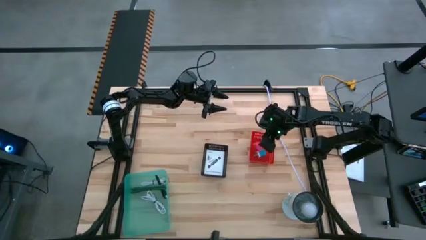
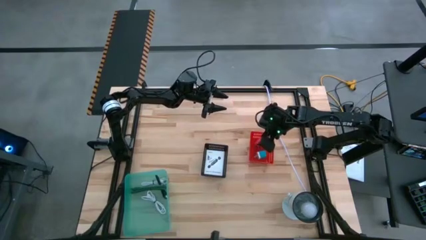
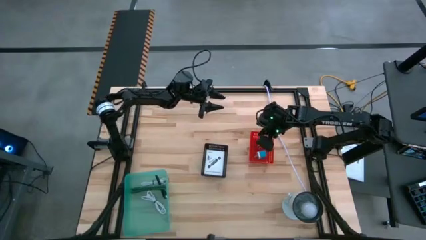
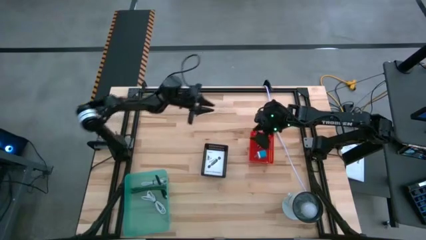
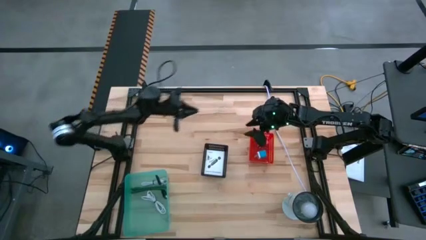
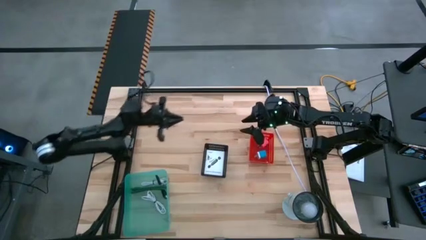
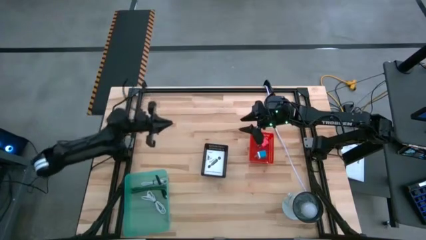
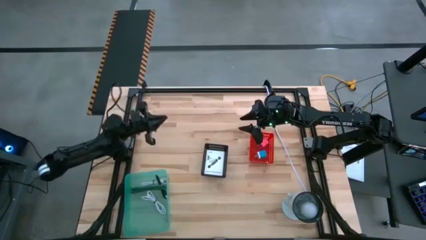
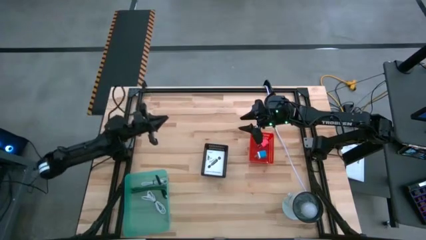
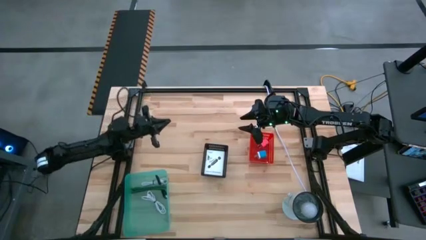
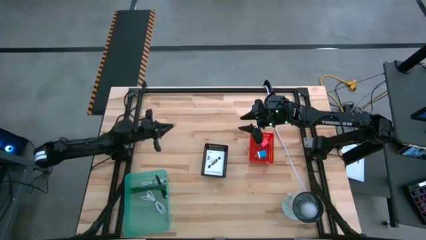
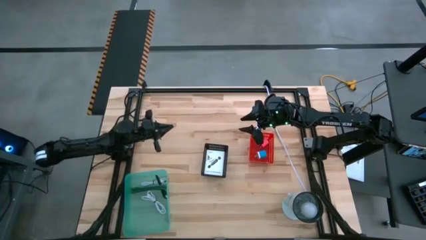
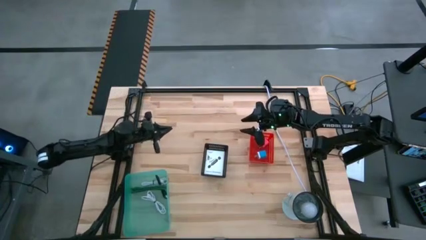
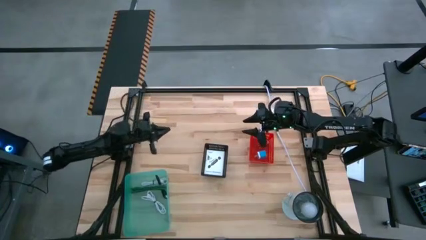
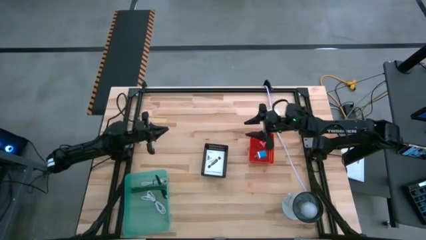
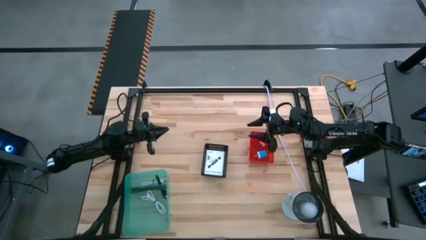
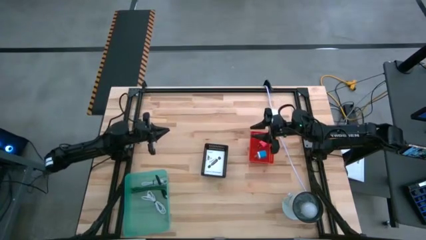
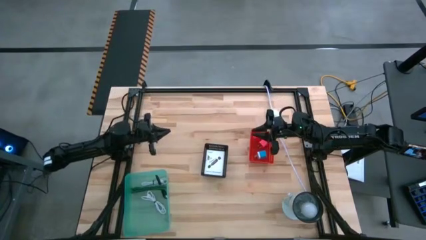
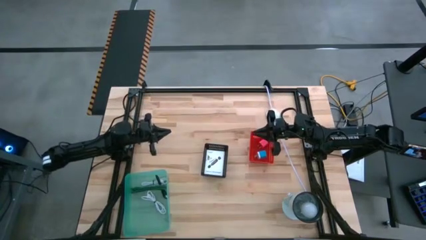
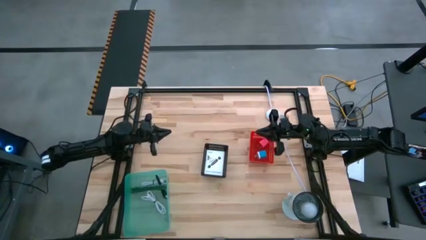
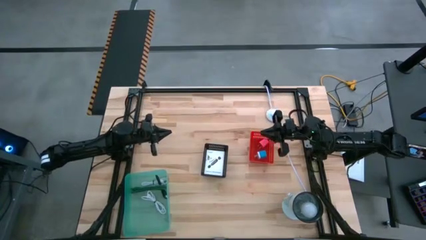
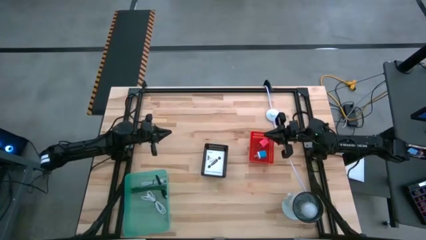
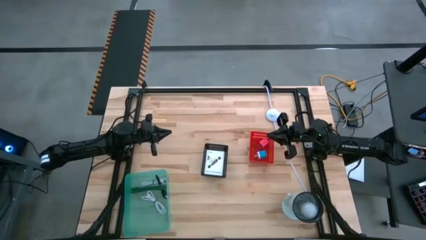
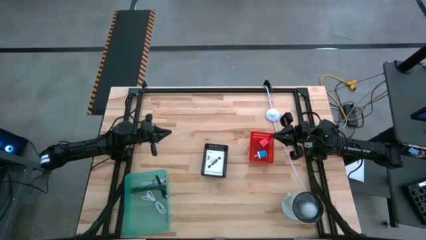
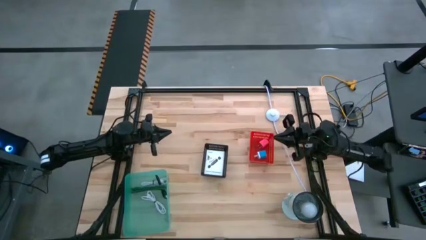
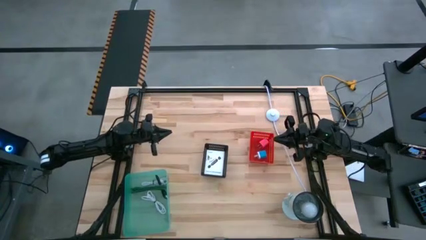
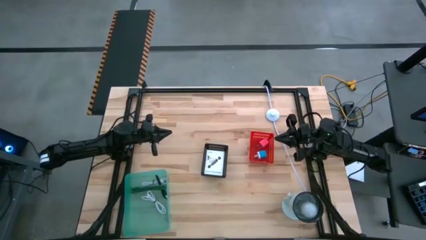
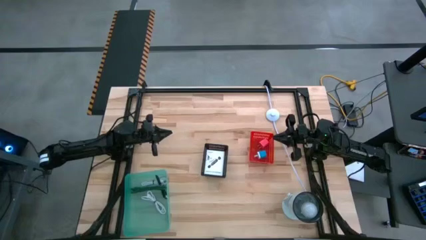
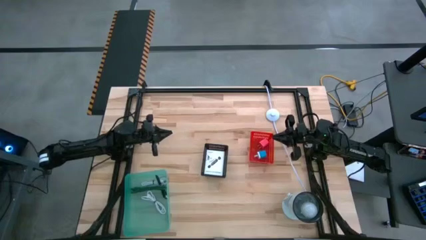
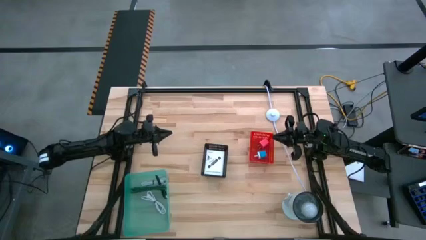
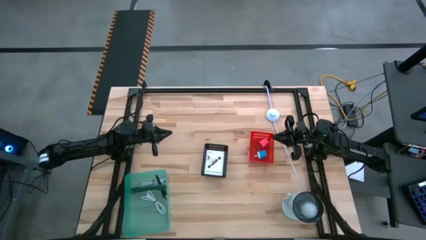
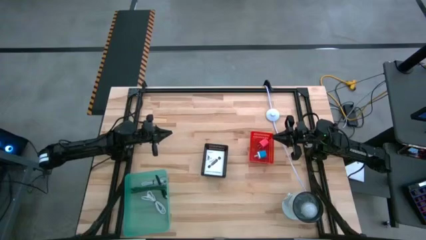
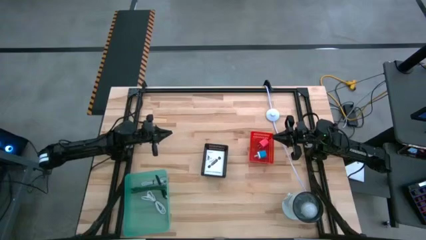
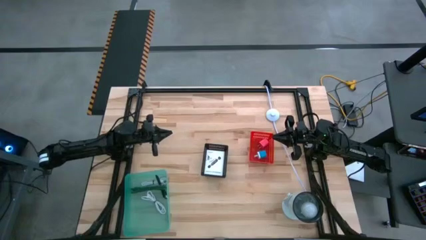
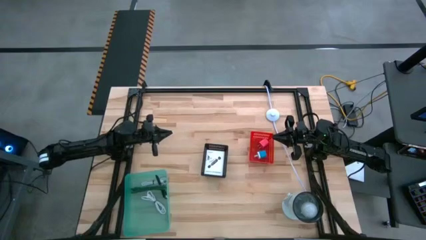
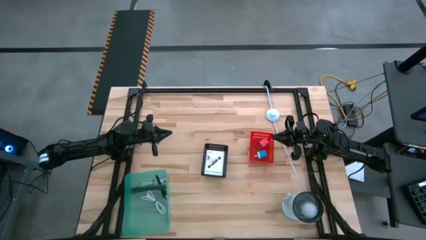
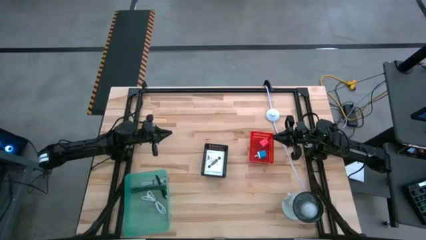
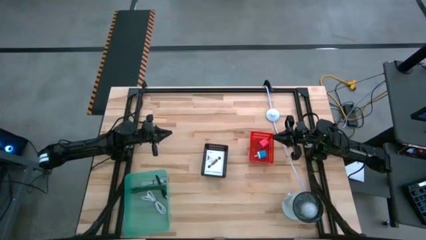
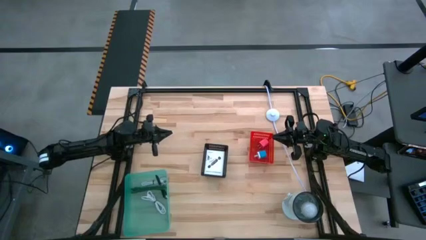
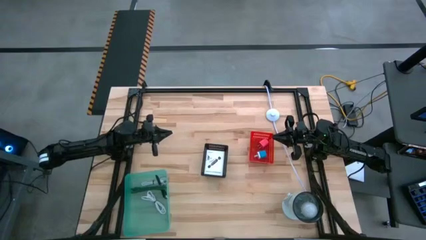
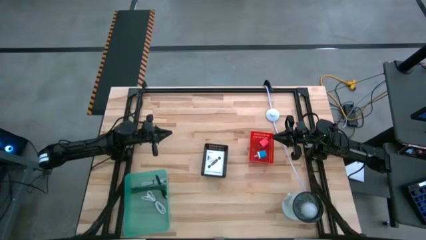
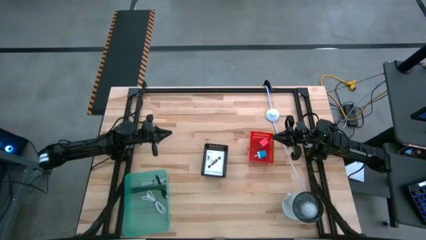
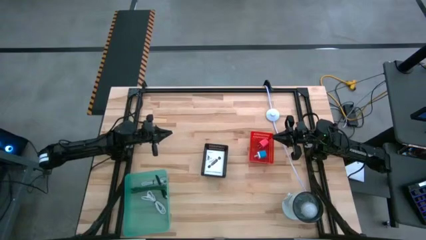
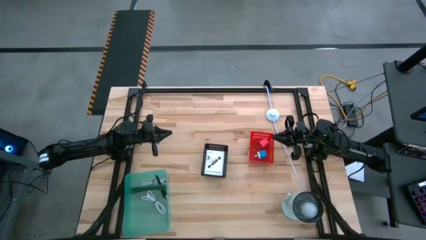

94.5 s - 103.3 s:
Task: Pick and place items into bin
Return to Home Position

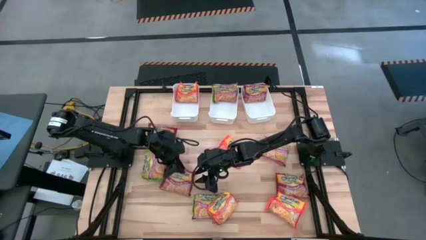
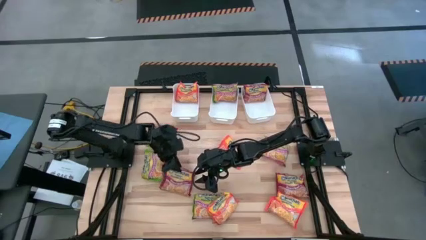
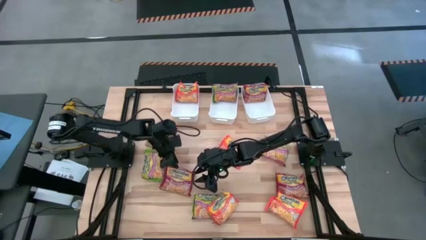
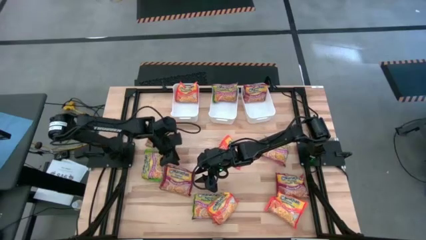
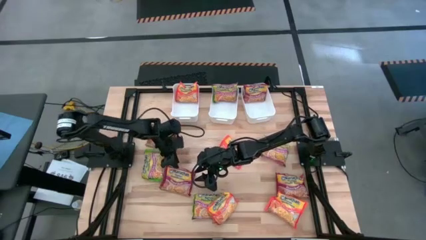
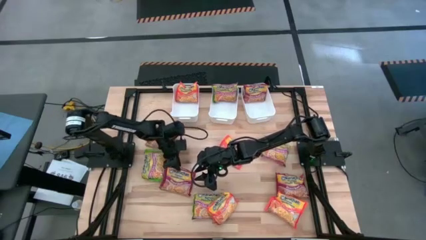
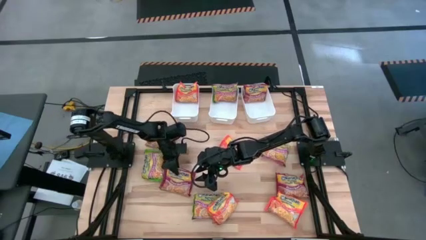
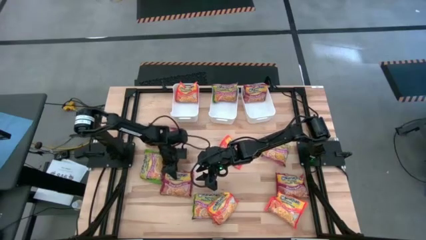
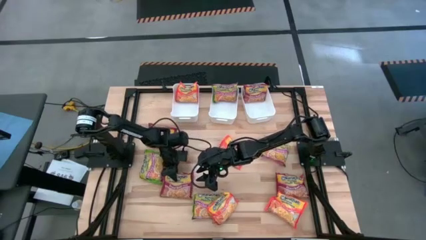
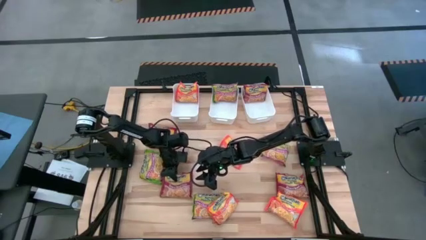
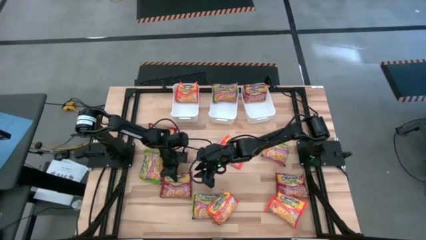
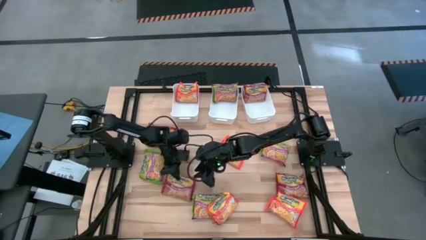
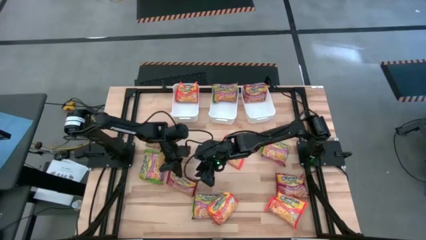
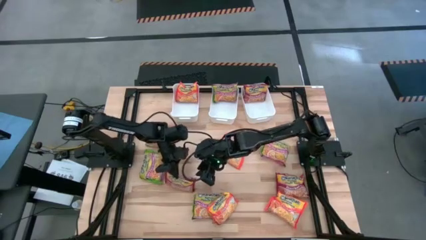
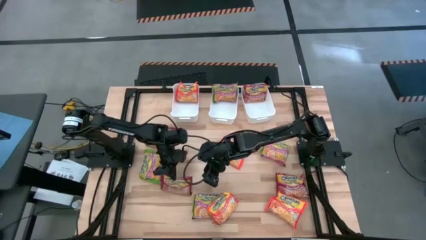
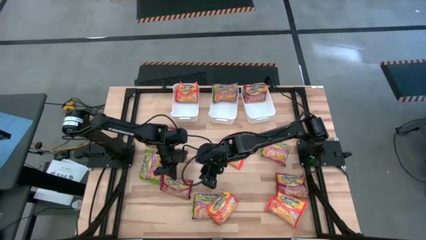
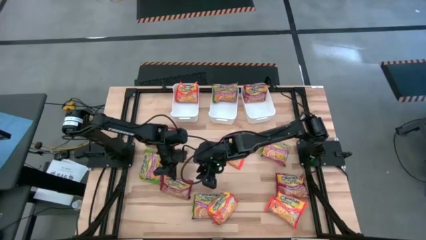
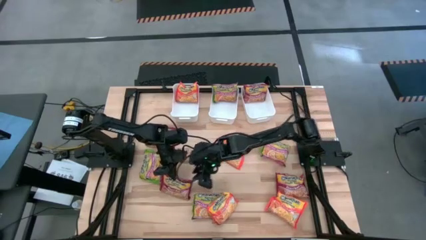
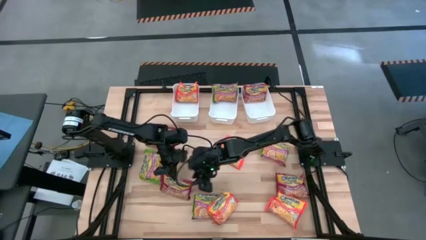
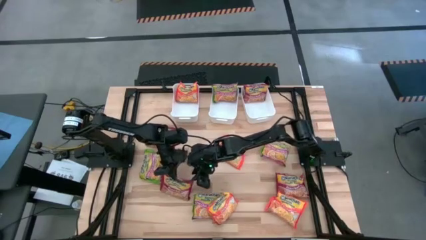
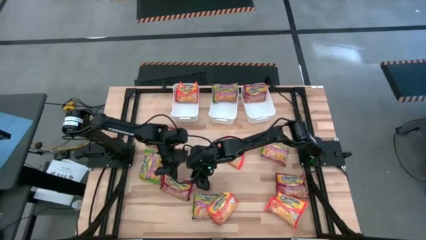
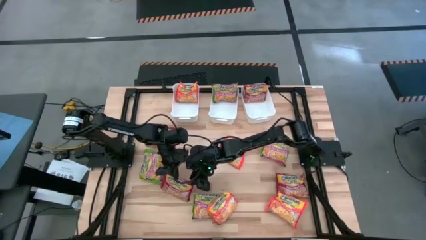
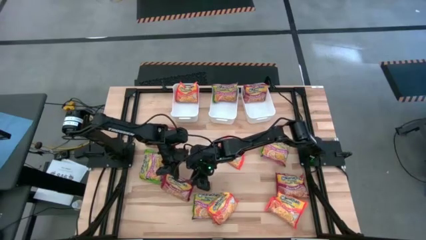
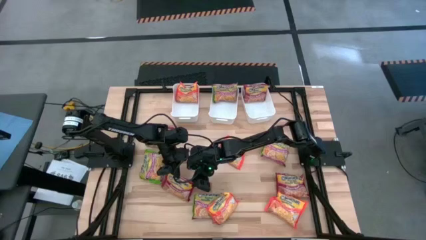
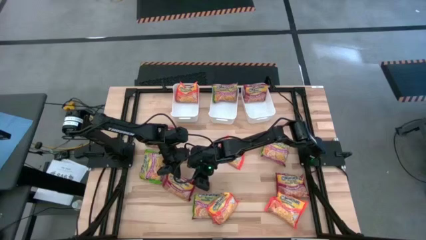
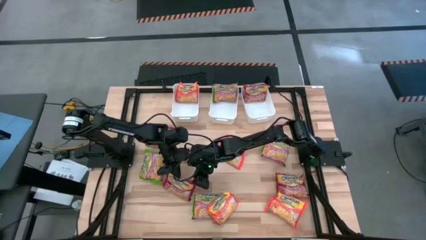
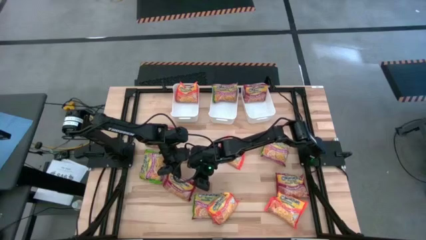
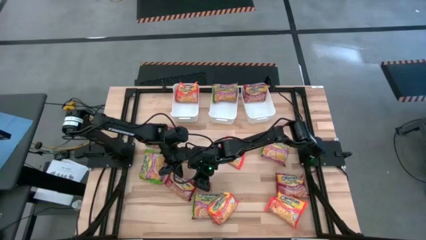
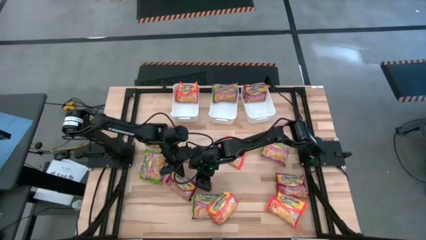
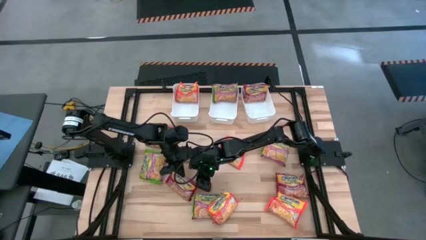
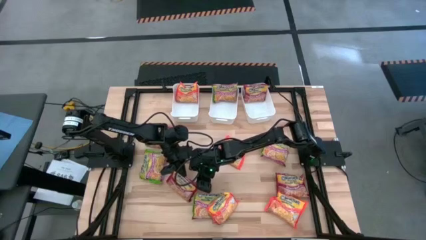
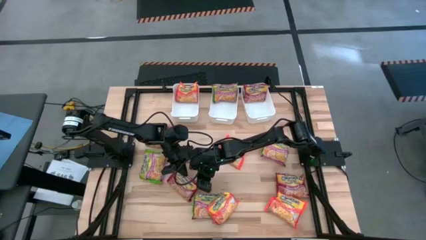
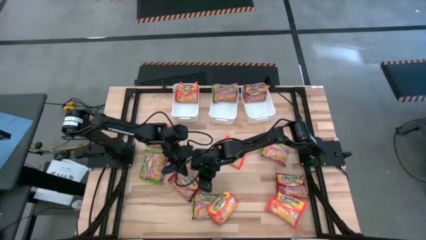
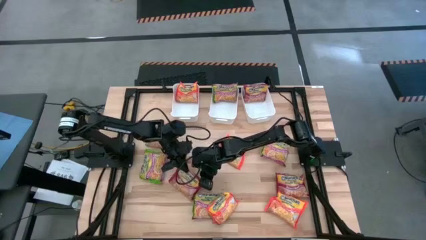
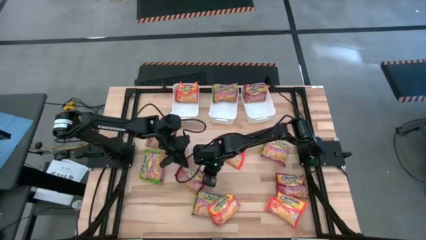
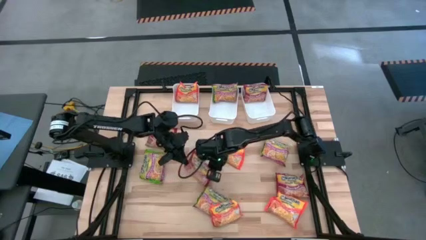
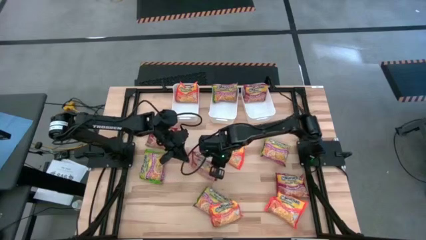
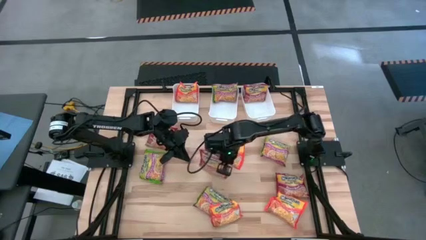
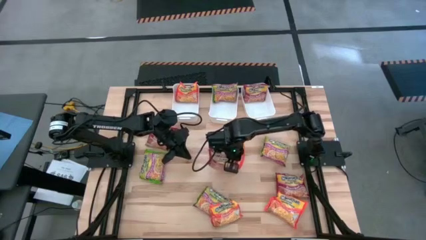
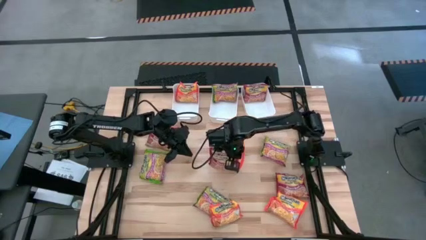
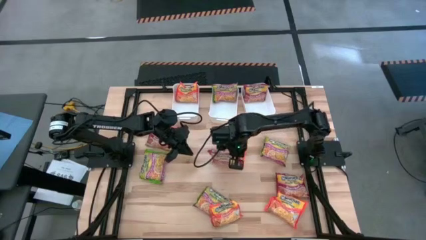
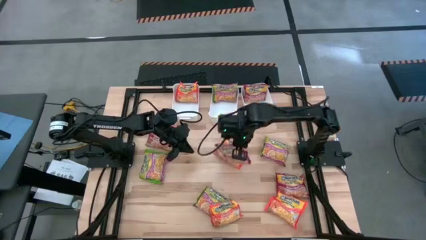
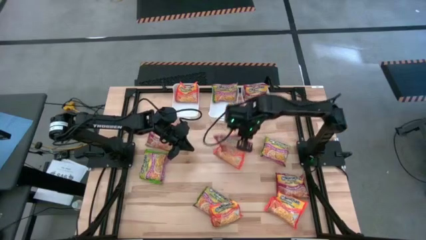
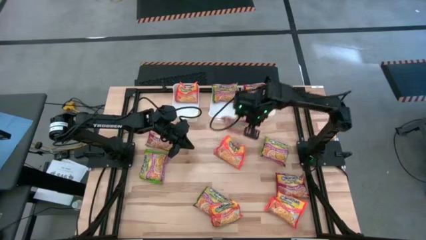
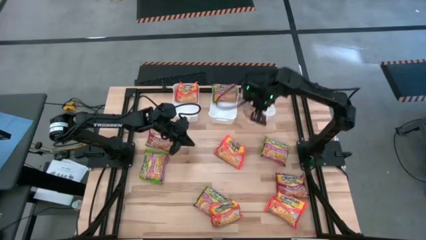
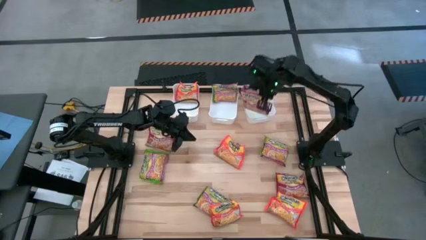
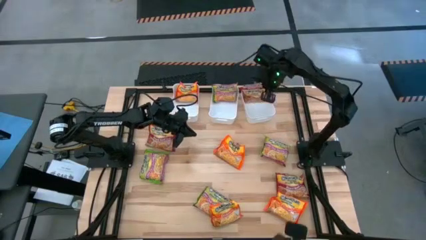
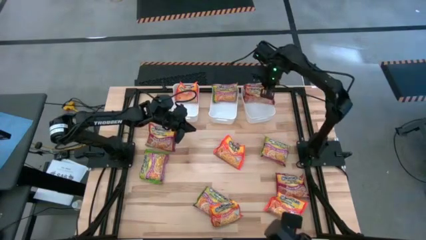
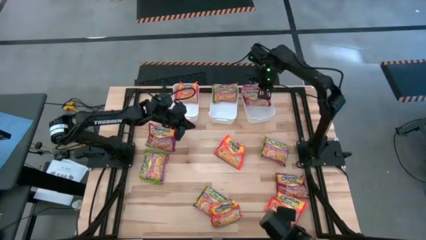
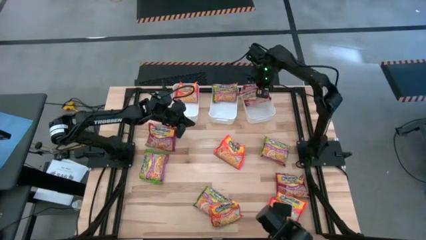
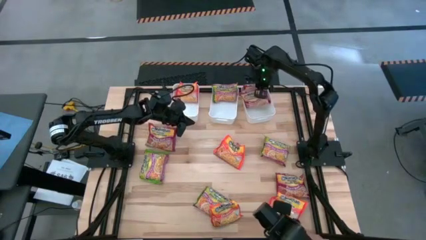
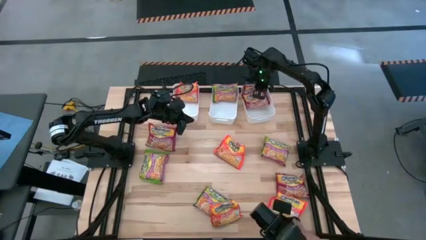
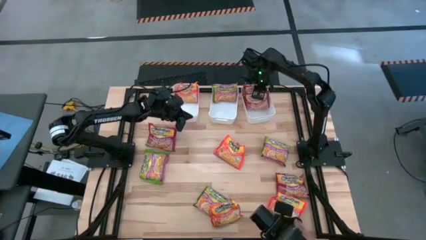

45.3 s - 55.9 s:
Task: Sort Maruchan noodles
Put the red noodle pack into the right white bin
